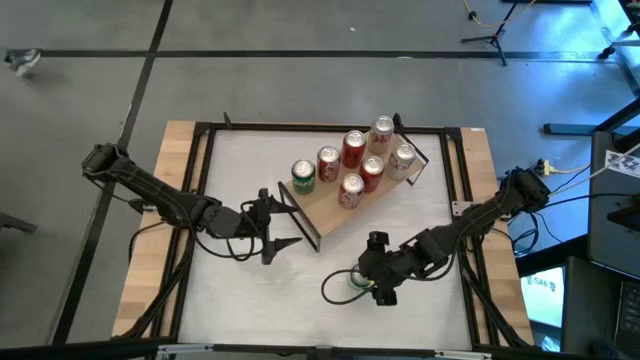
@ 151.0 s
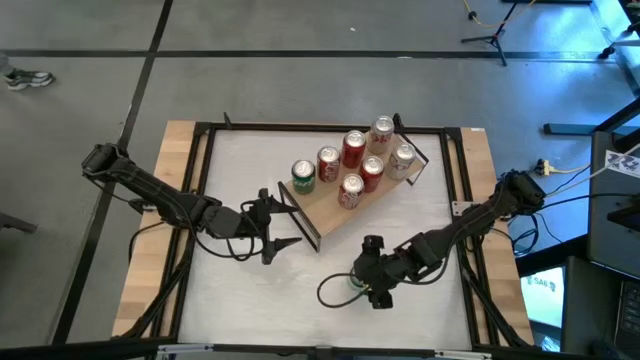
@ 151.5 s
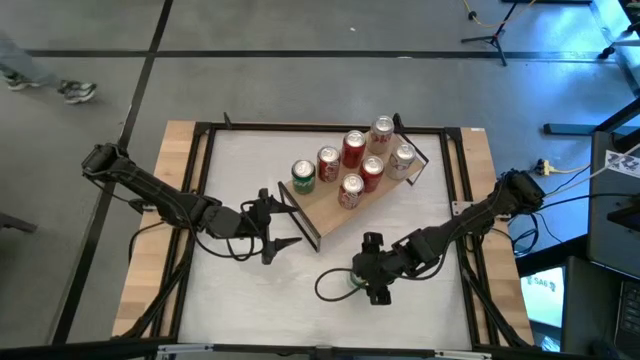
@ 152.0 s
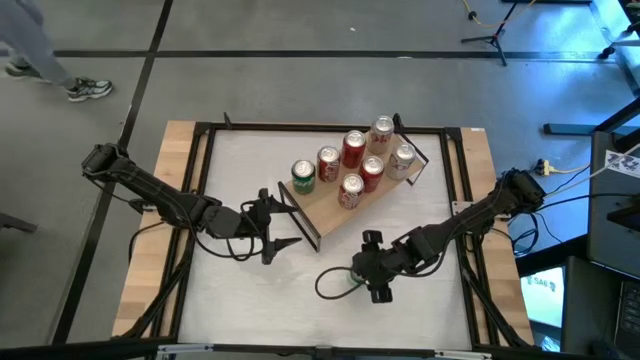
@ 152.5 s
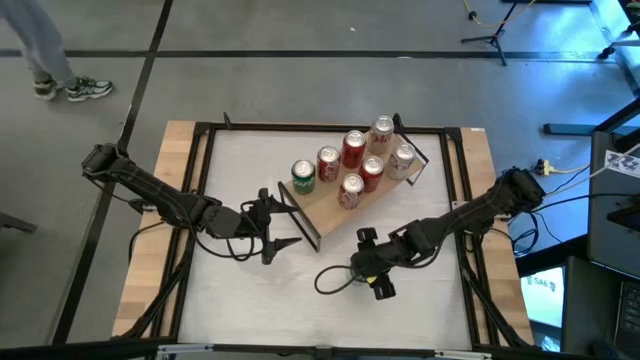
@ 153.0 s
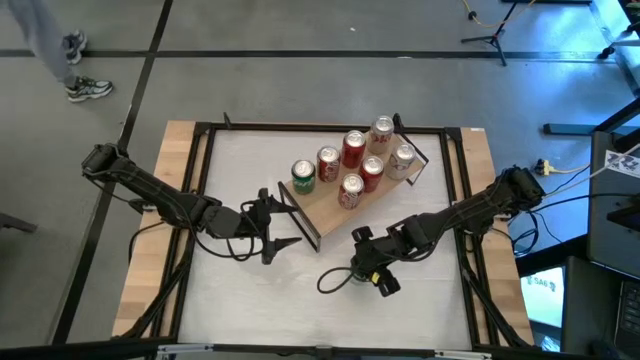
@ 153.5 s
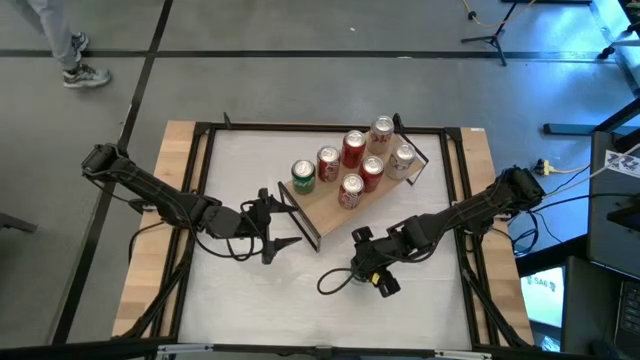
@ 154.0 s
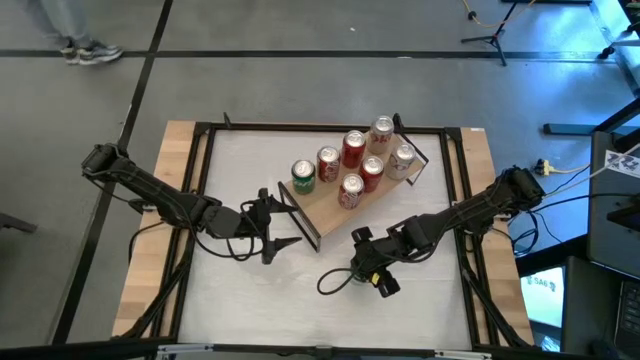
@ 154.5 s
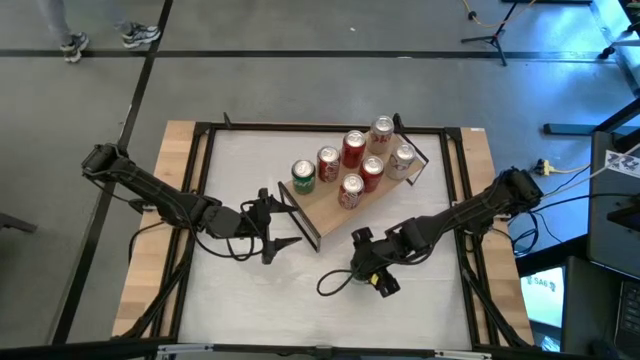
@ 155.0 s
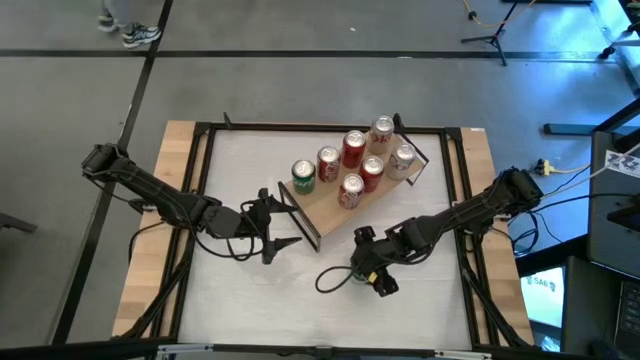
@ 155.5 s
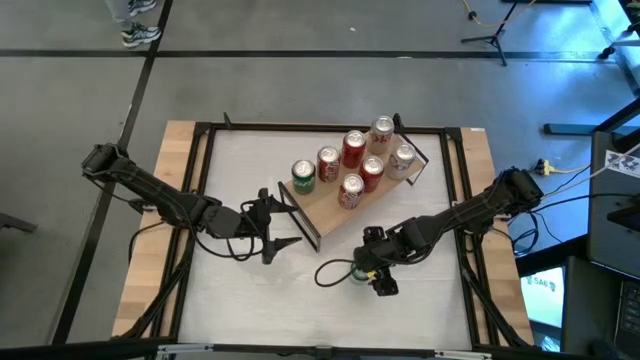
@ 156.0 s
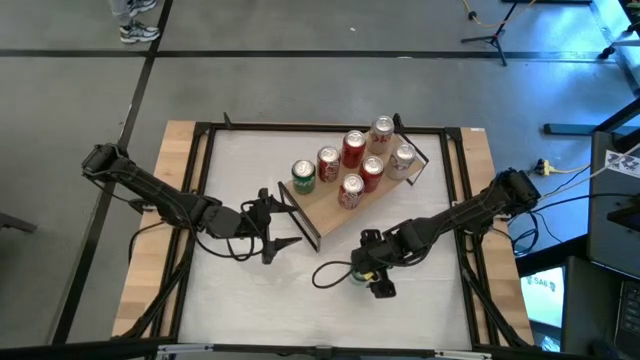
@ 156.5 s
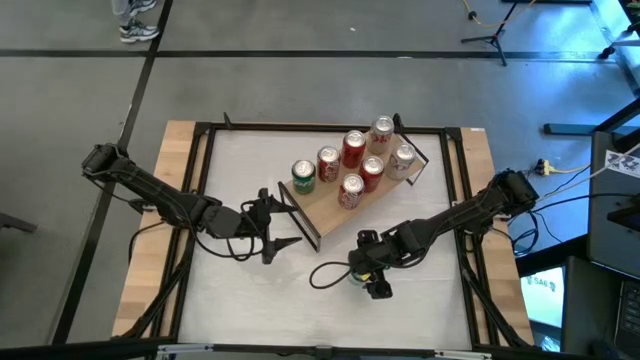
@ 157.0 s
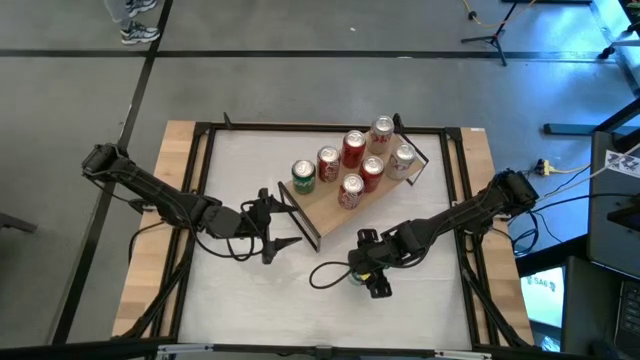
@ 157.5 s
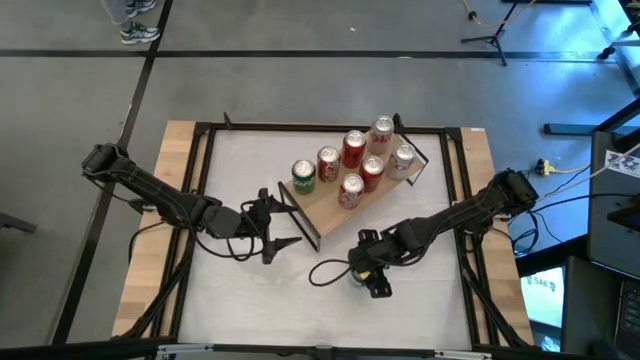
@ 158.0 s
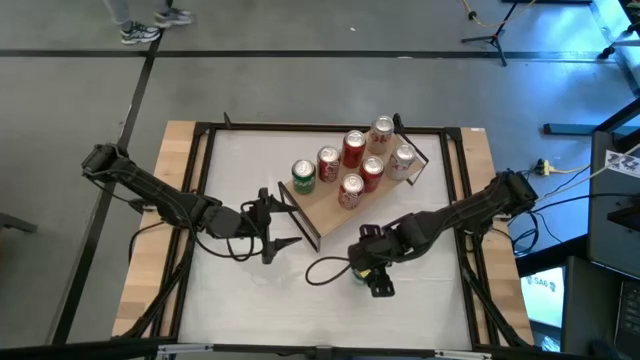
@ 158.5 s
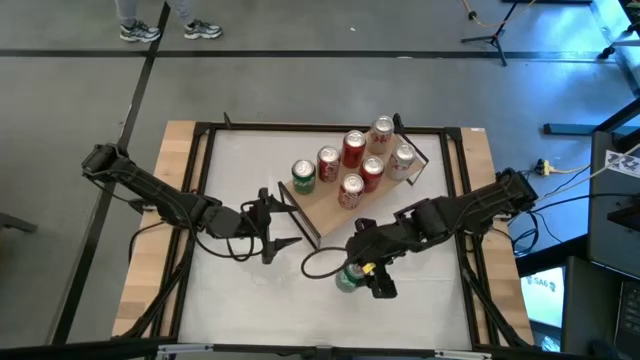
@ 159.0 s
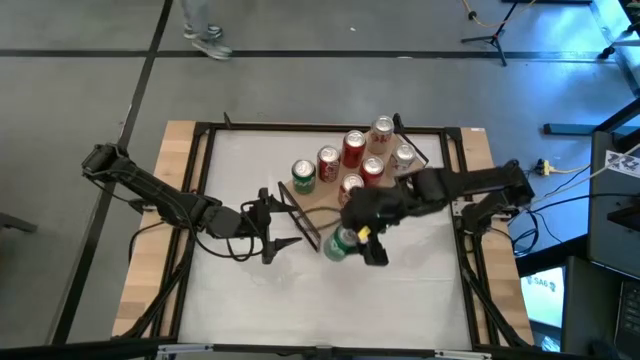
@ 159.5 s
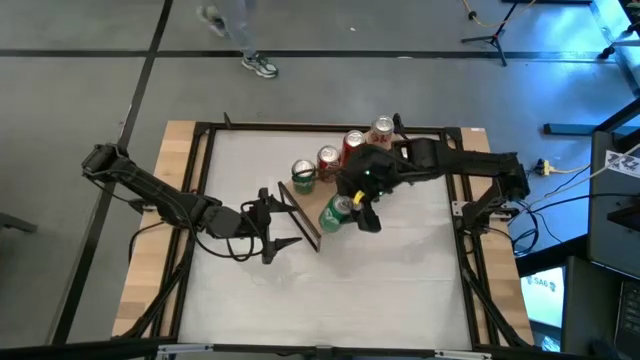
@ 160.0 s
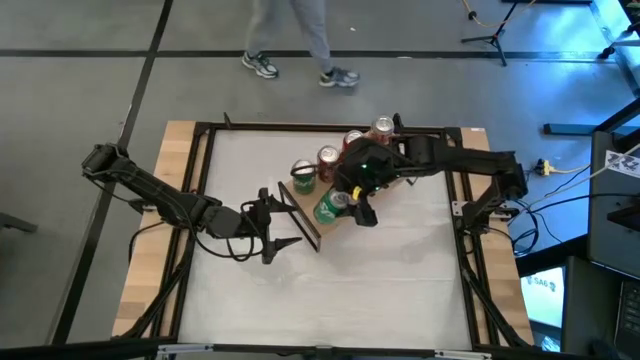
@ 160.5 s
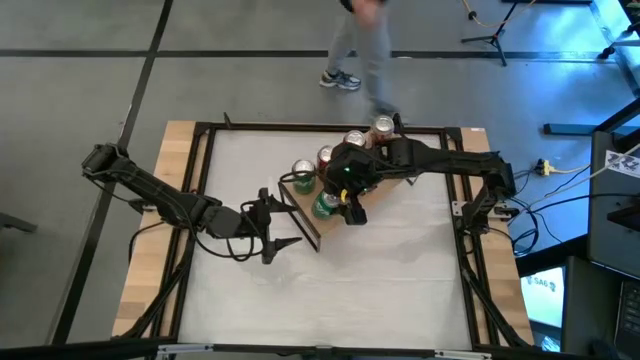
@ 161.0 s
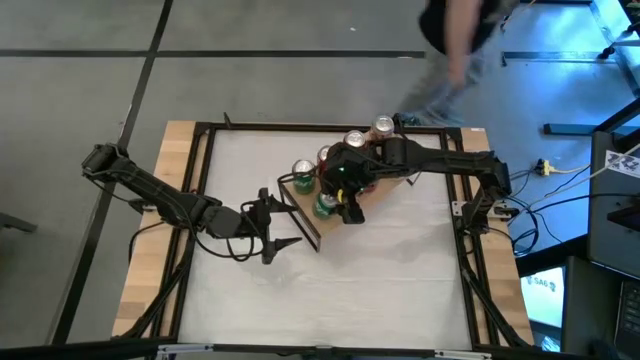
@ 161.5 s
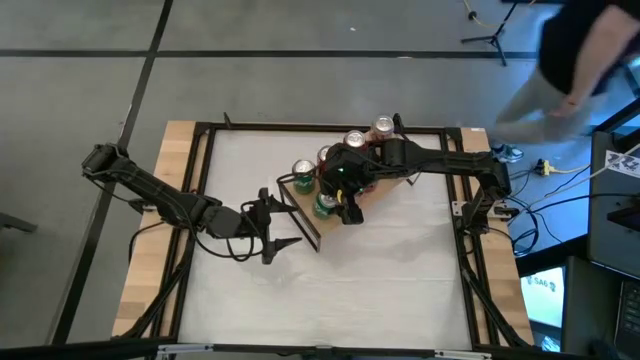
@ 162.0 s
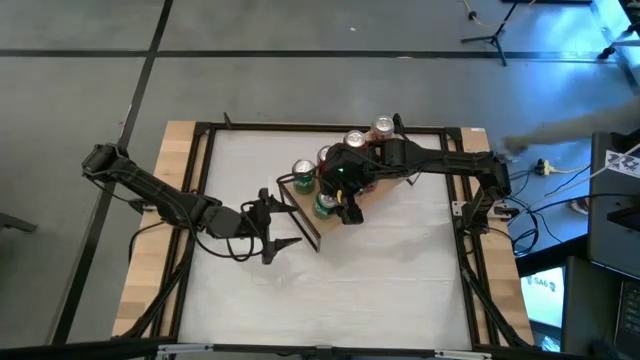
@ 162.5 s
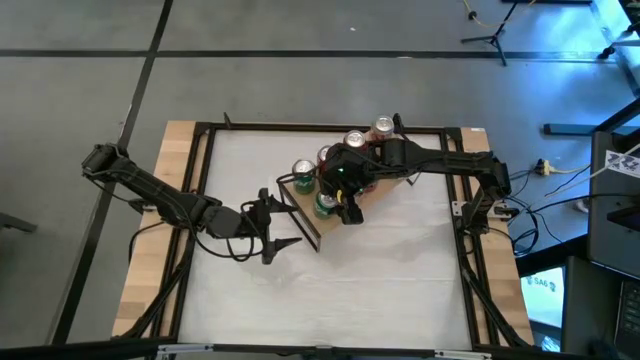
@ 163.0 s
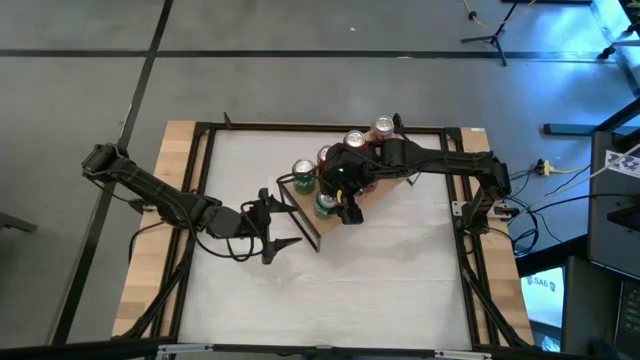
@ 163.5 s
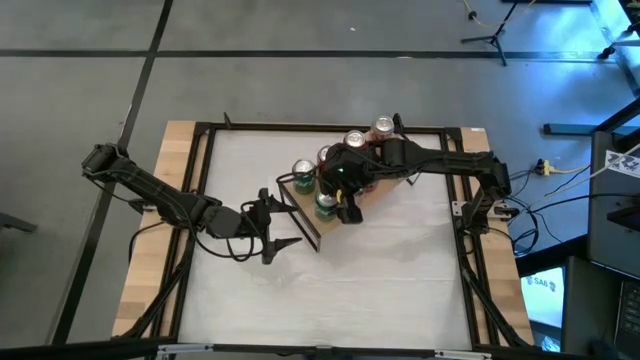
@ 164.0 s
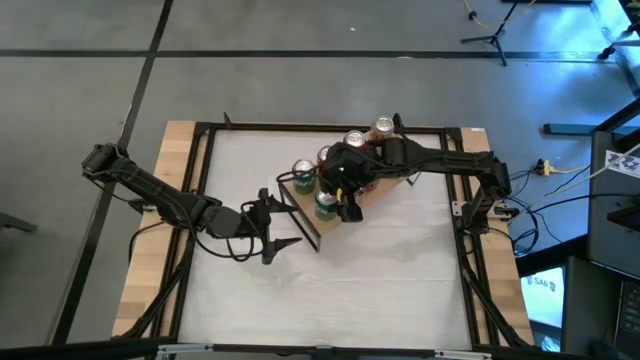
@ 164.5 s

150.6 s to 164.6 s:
Task: Place canned beverage on shelf
Put the green soda can on the shelf aligned with the other green soda can

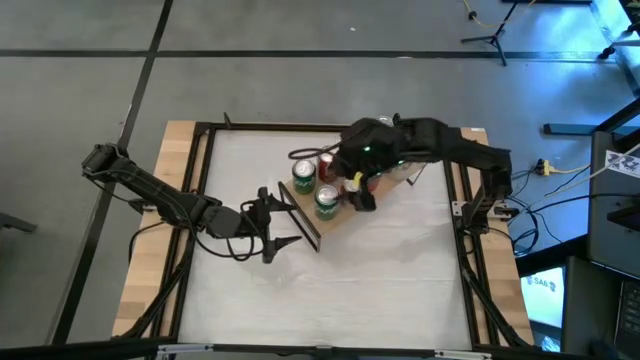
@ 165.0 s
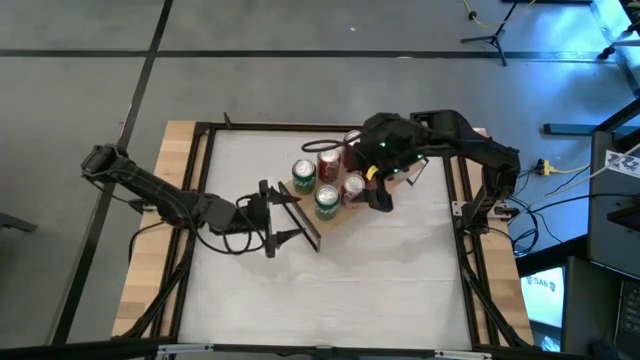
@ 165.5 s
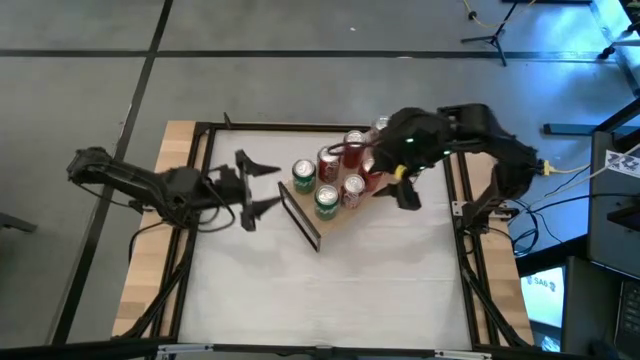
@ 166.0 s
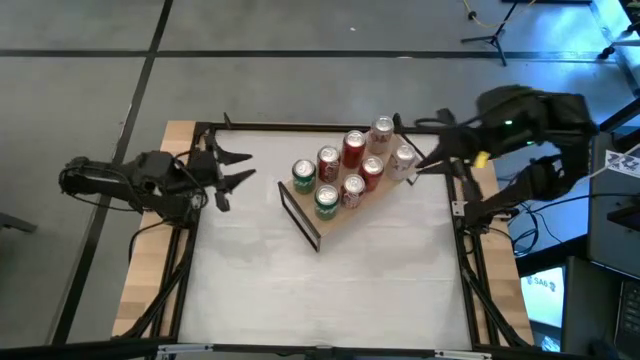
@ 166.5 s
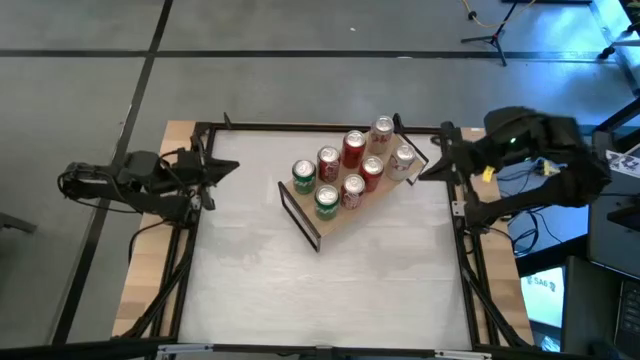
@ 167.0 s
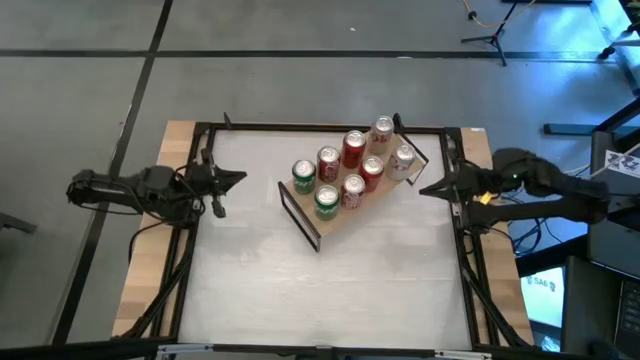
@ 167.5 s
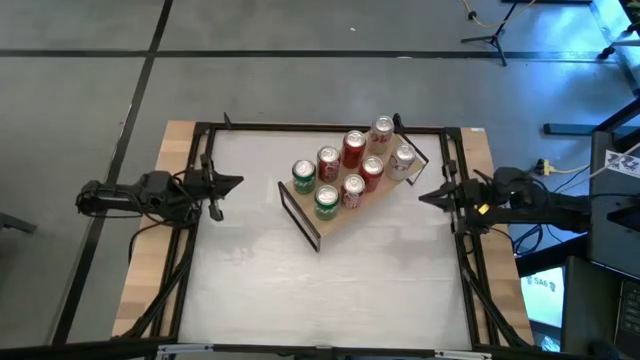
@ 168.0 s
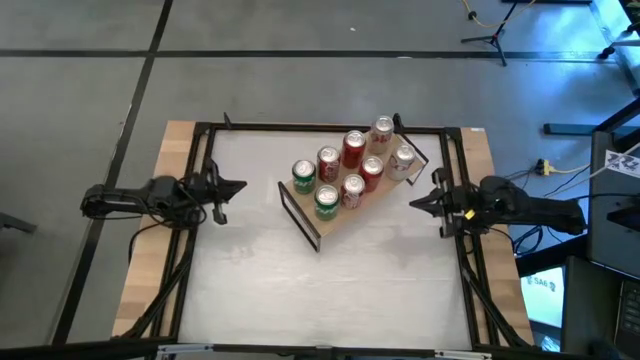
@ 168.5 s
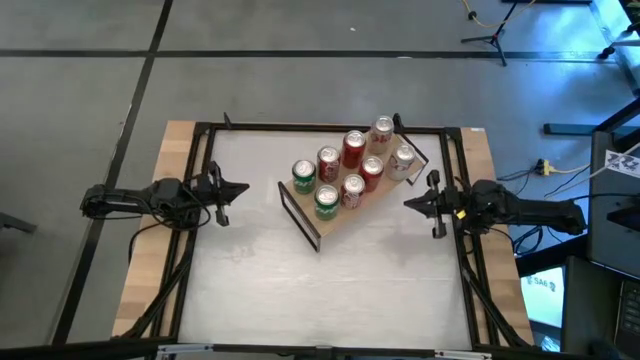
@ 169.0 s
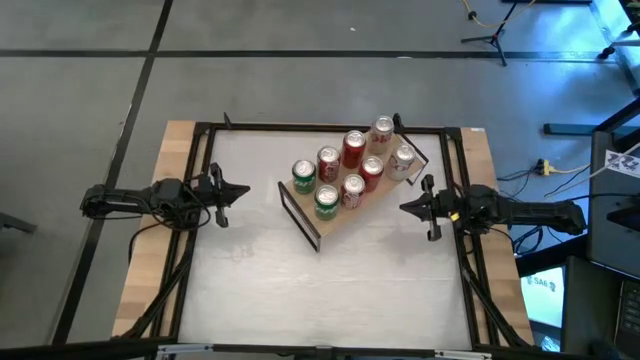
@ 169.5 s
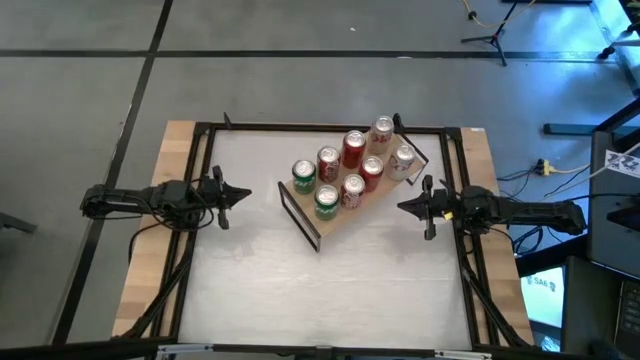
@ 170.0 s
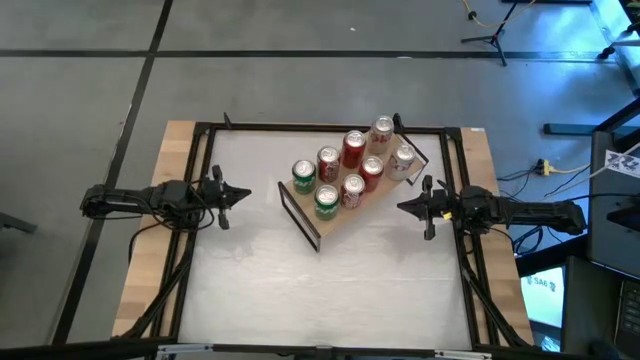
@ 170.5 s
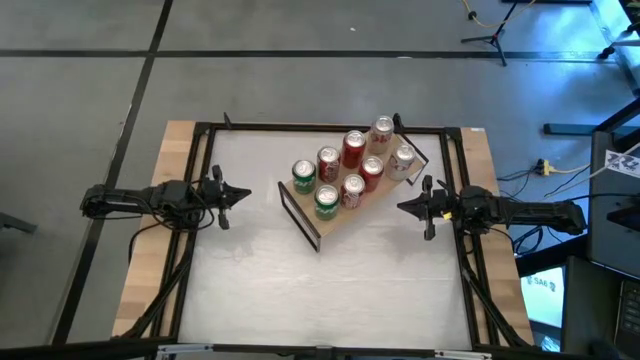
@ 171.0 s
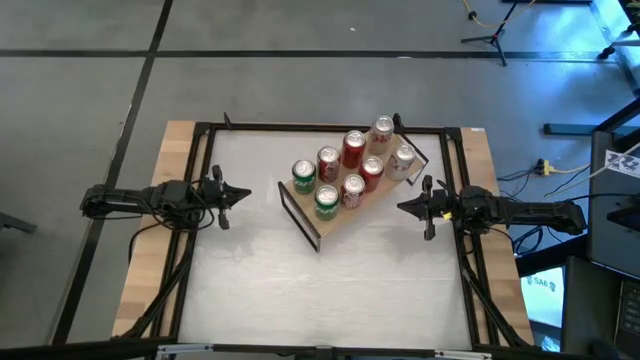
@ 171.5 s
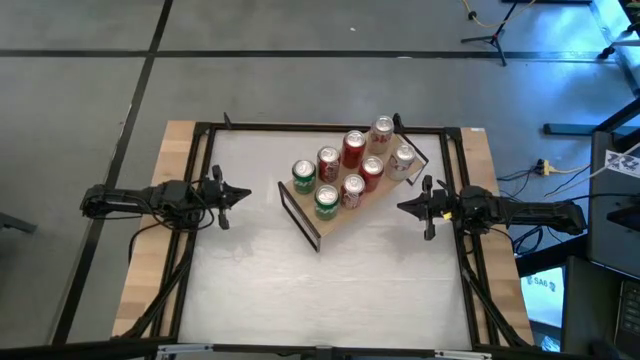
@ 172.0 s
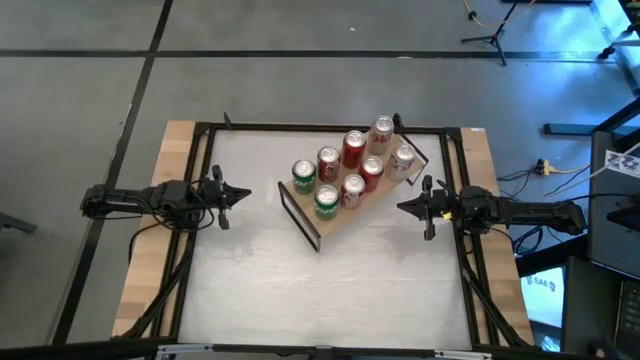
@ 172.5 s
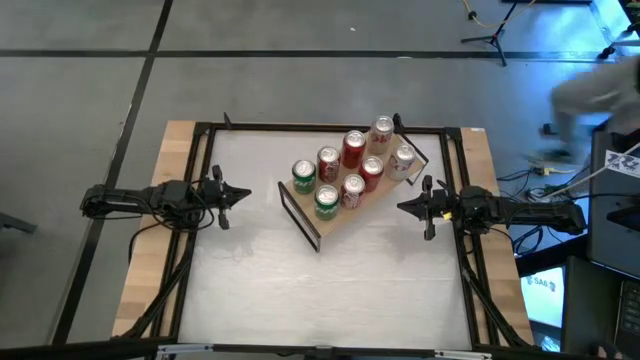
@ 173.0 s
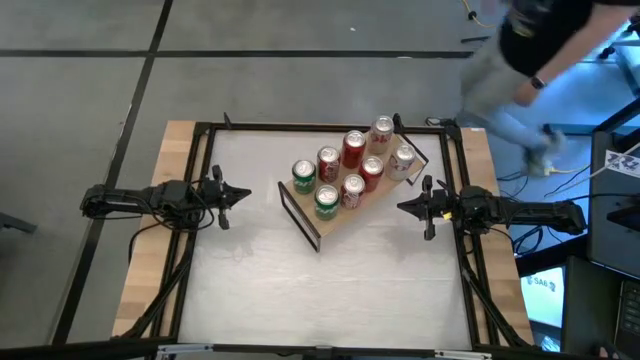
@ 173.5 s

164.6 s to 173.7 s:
Return to Home Position
